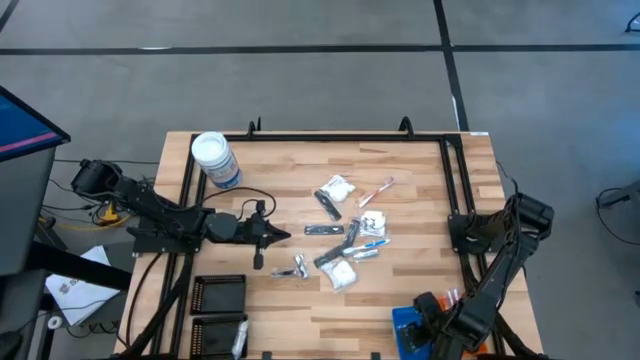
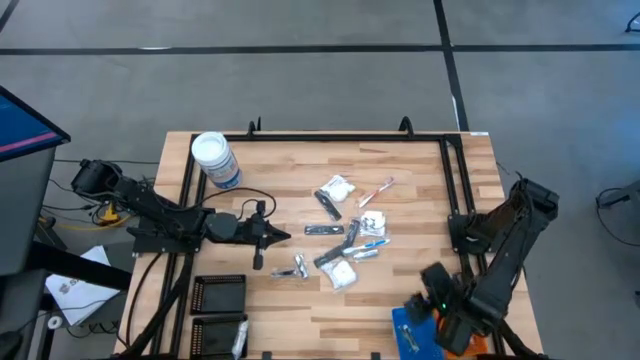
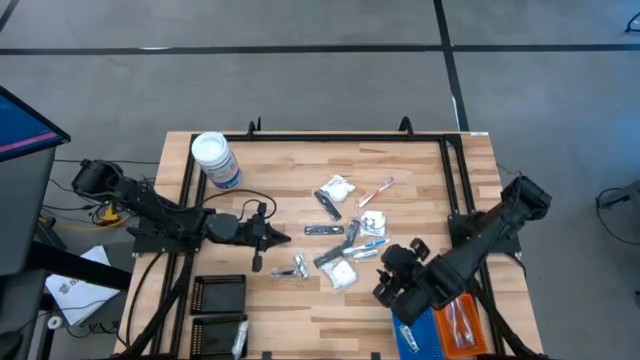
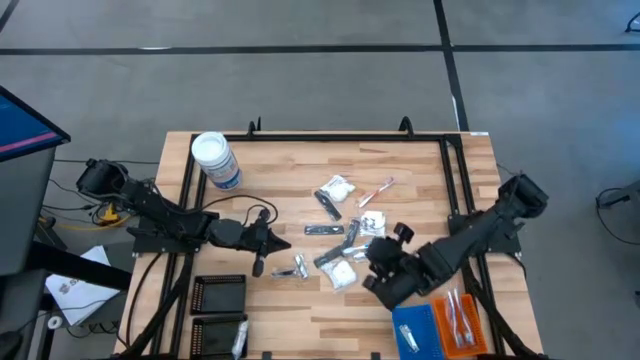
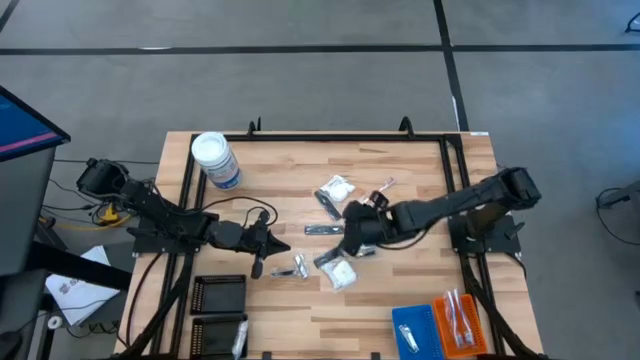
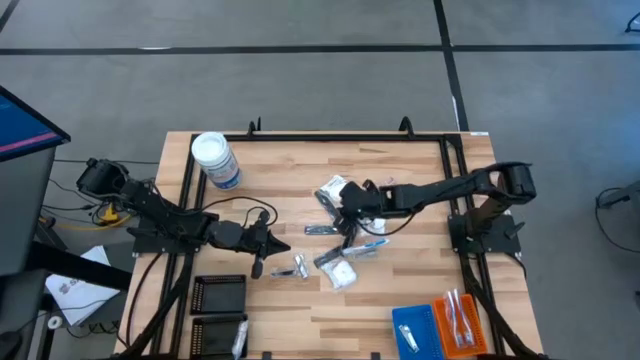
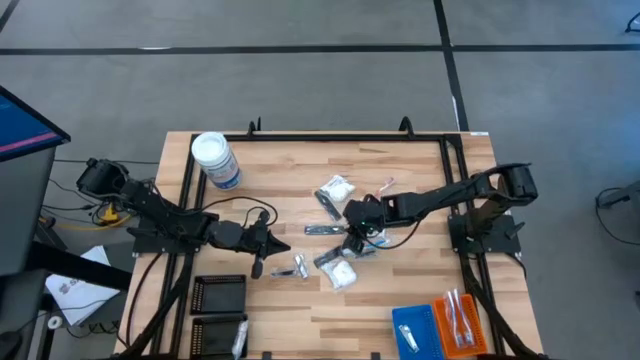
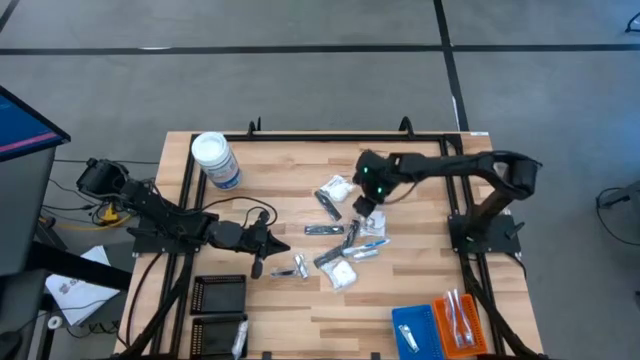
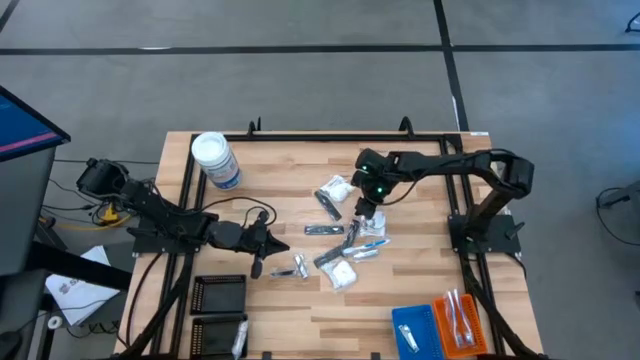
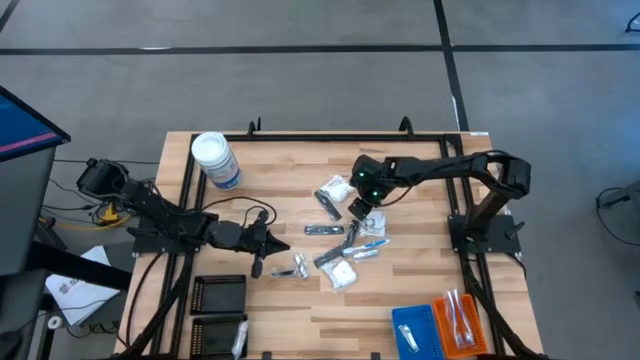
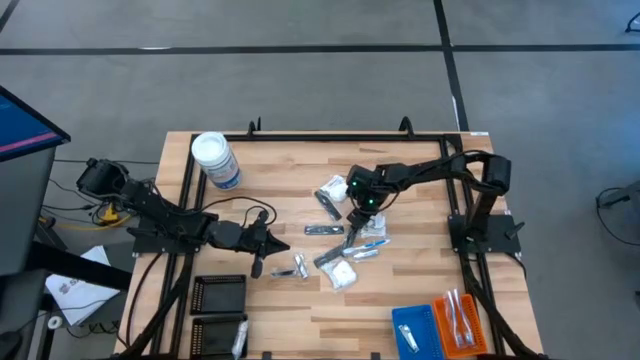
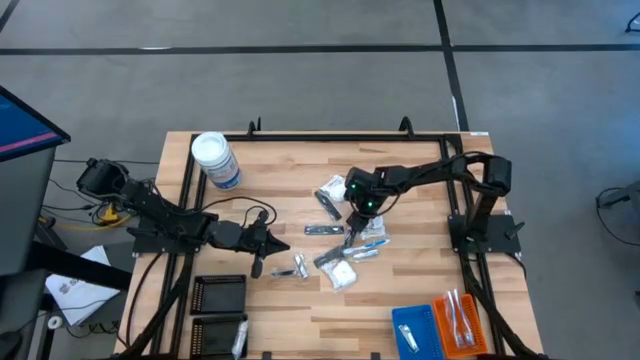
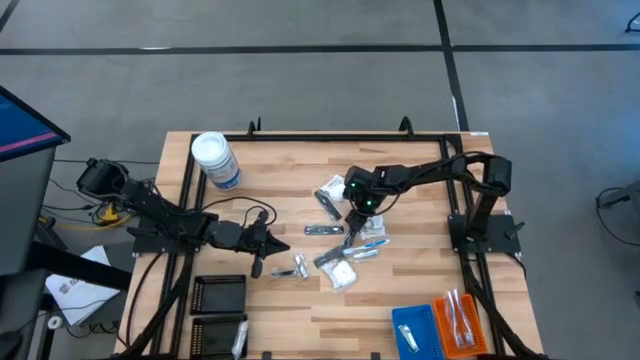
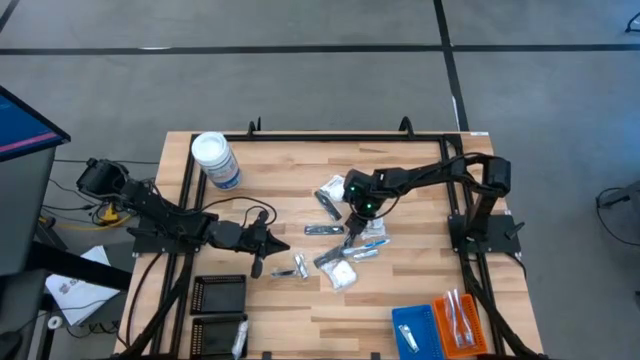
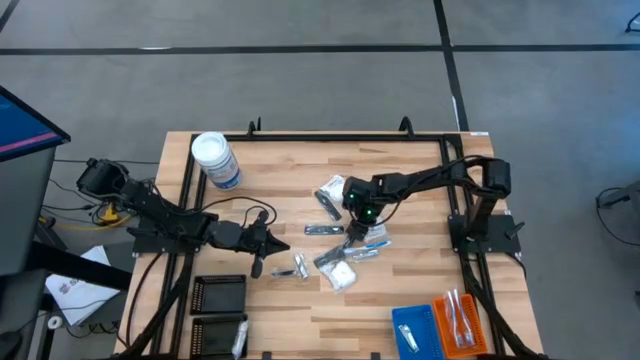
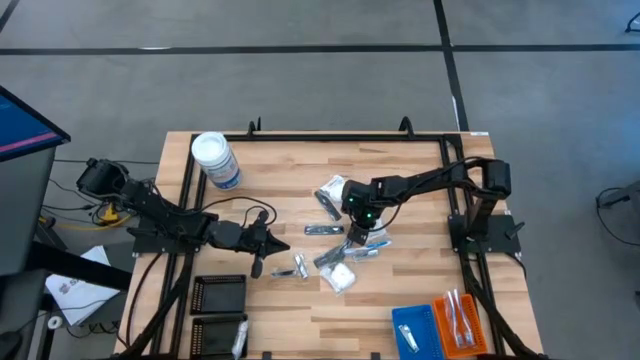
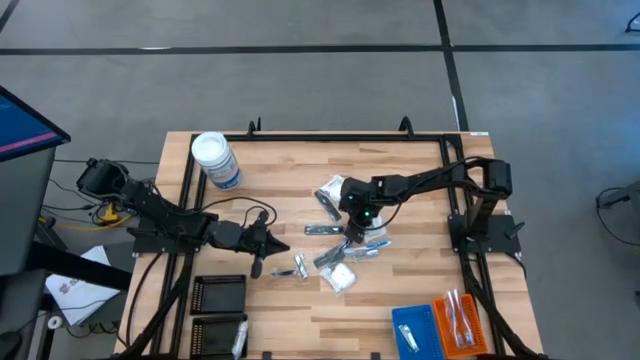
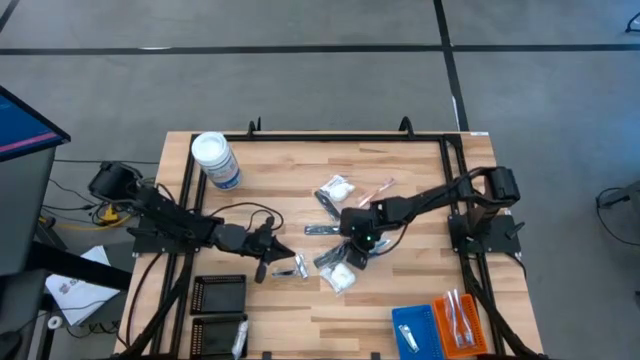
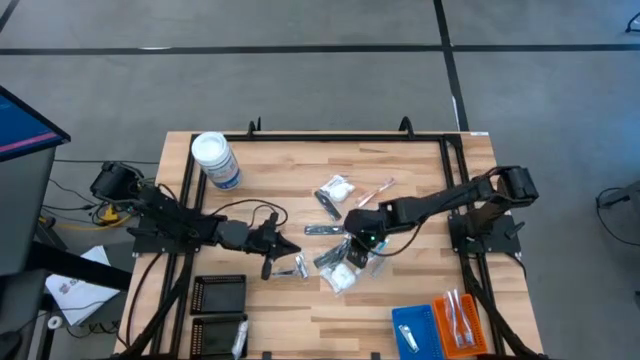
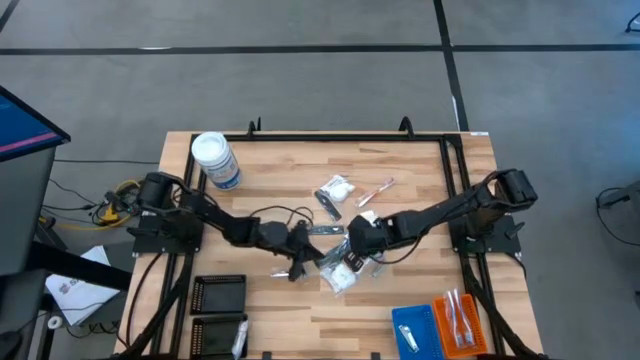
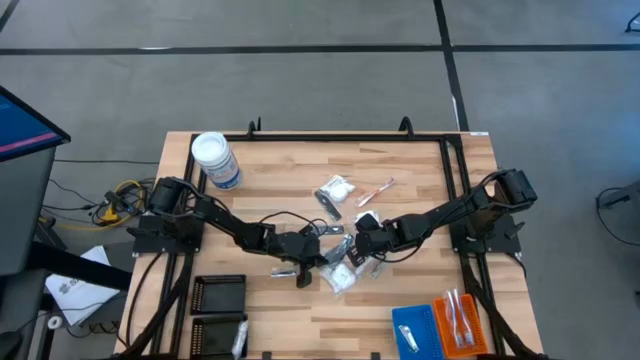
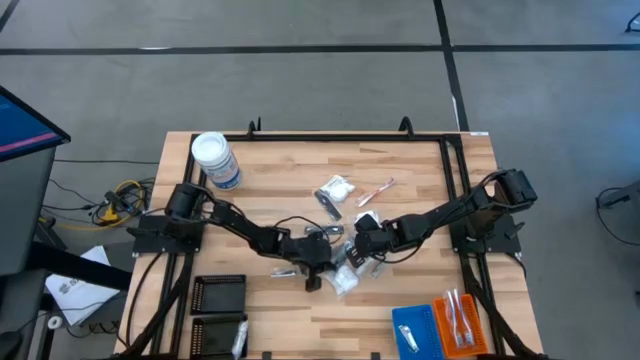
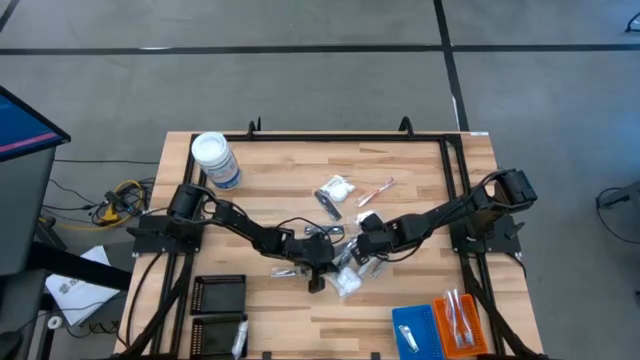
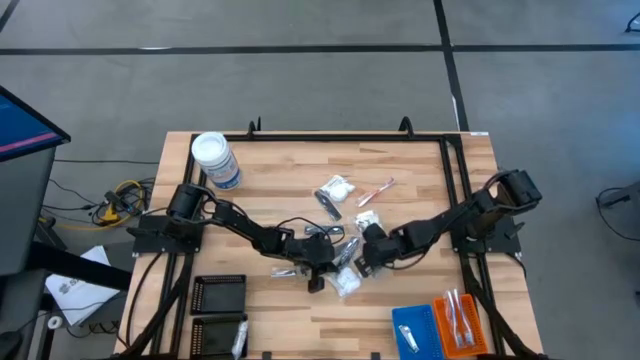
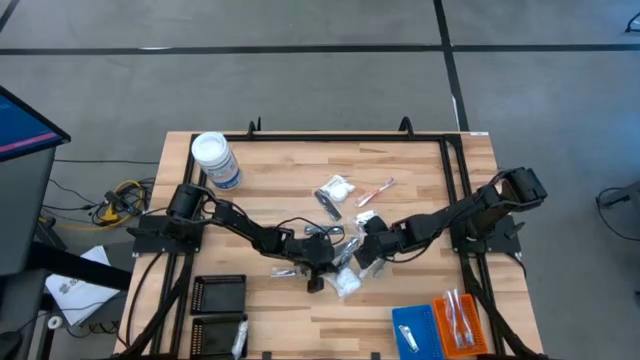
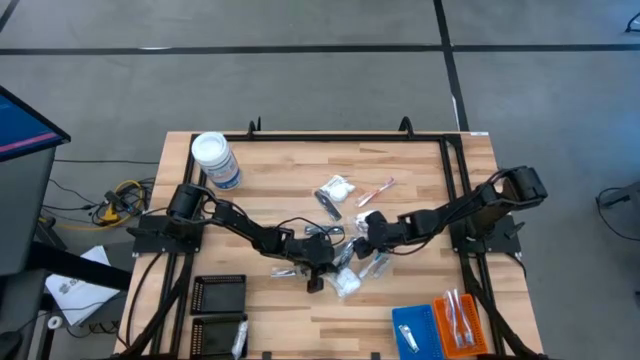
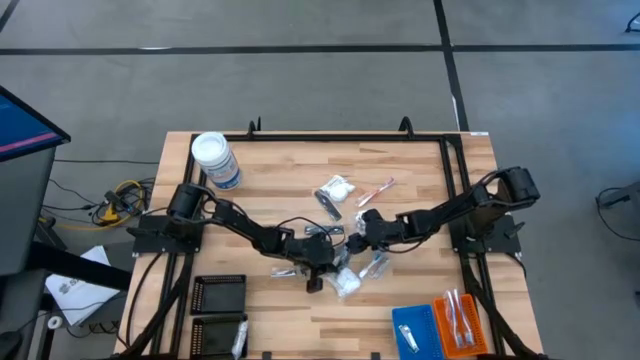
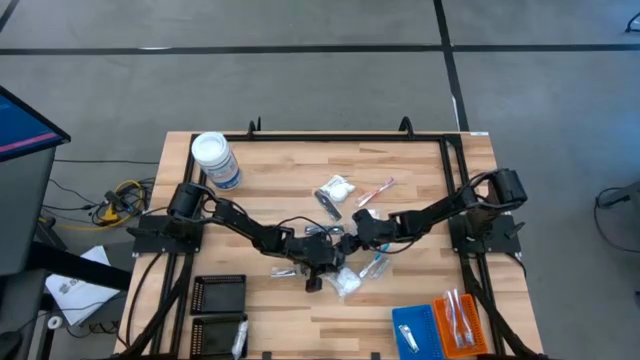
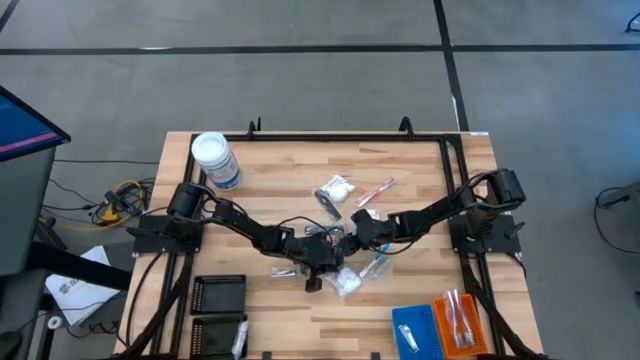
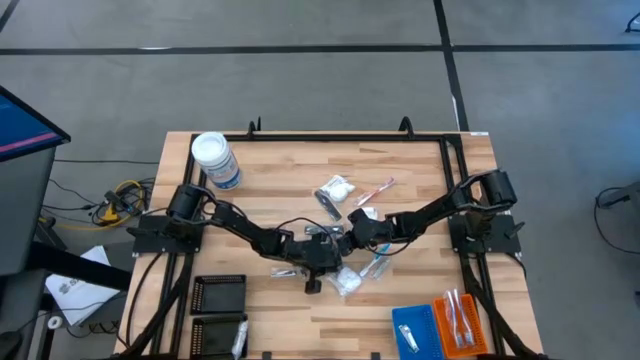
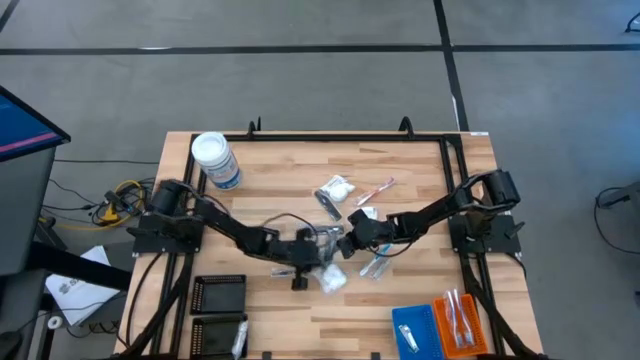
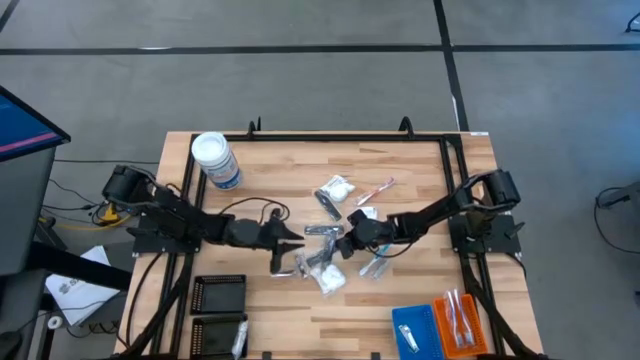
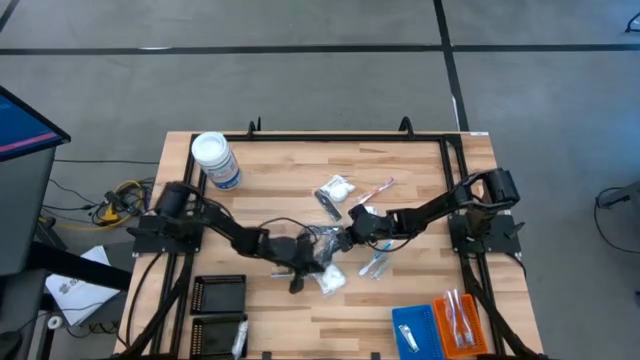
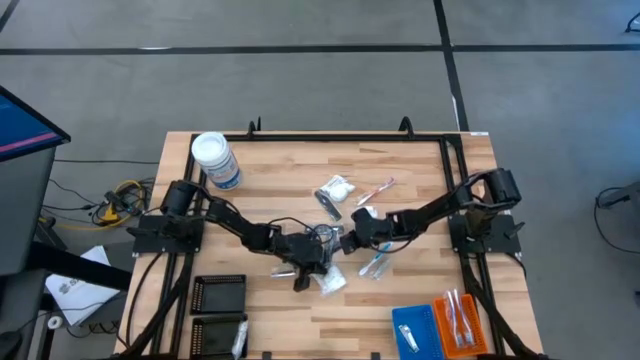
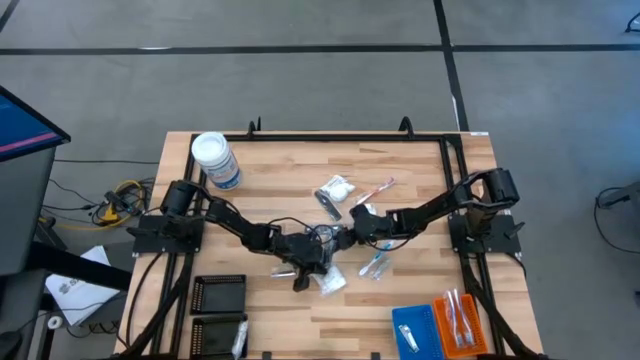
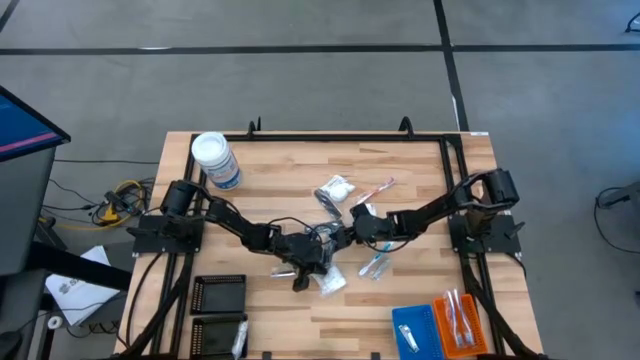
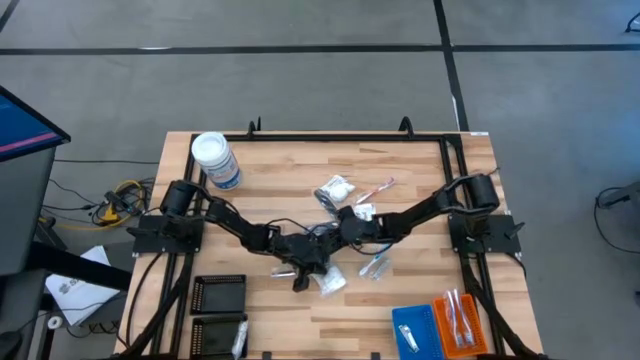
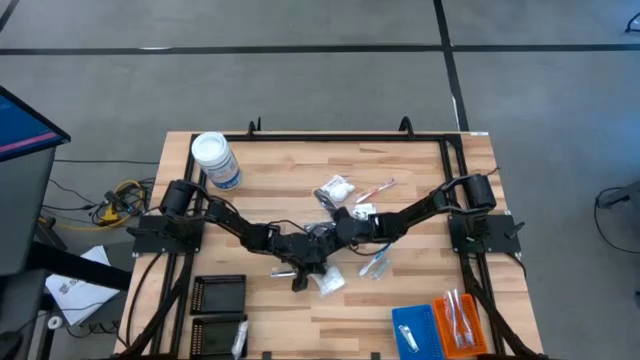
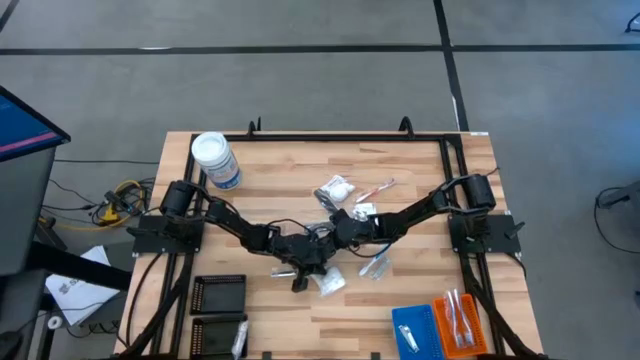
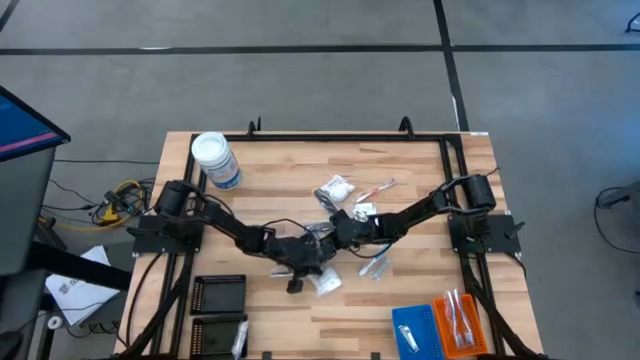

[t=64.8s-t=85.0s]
Task: Pick & Place Travel size toiletries
Put the black comb into the top black bin
